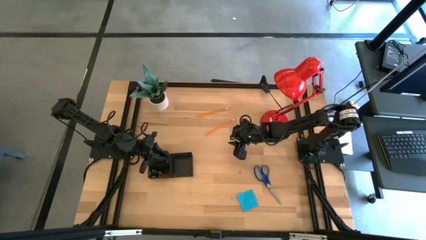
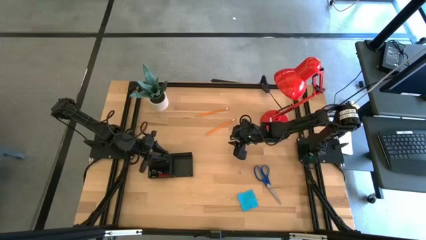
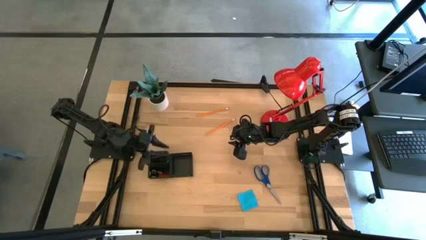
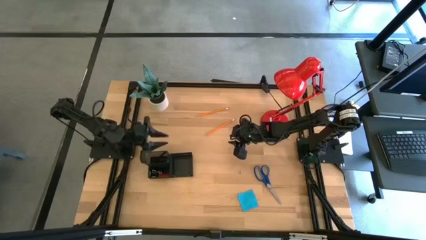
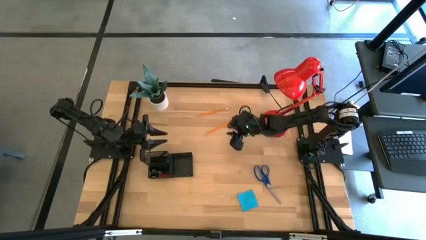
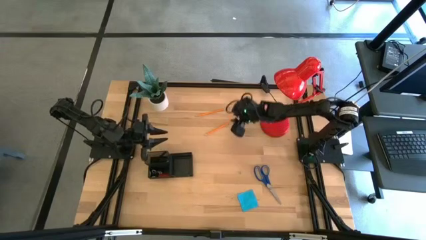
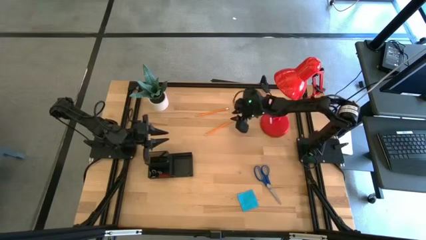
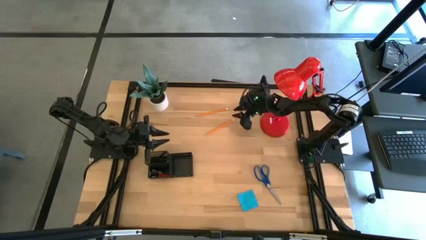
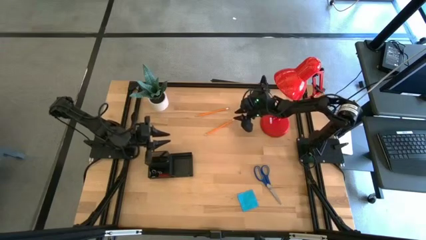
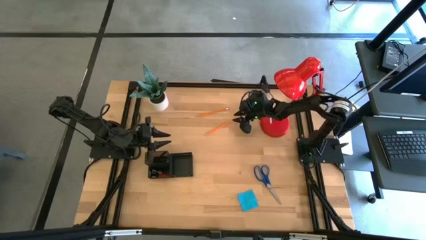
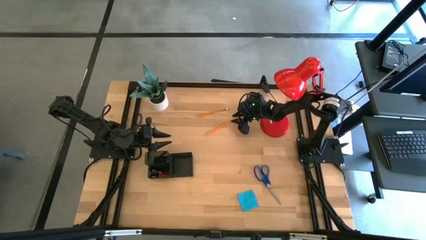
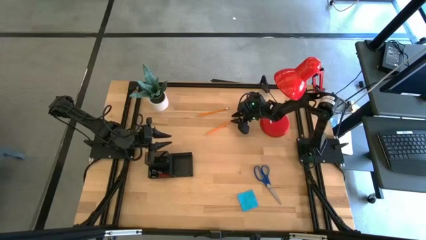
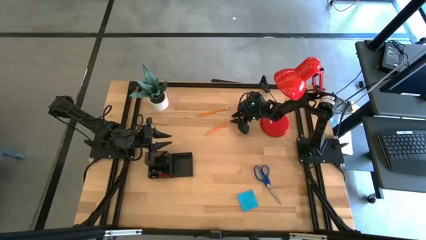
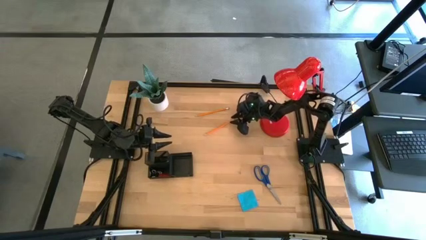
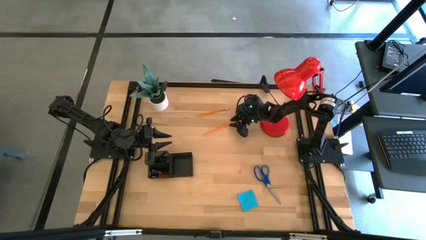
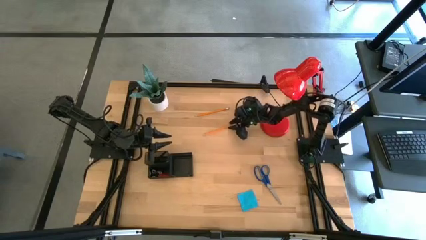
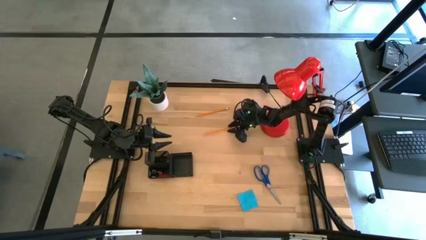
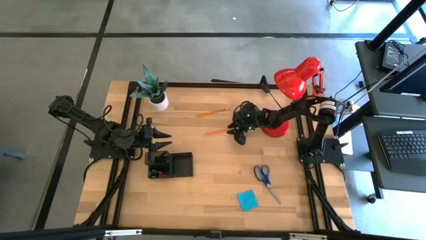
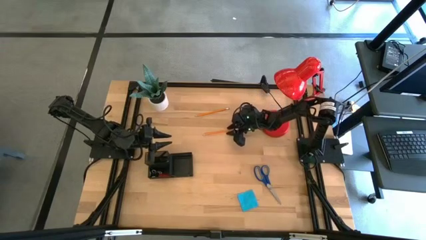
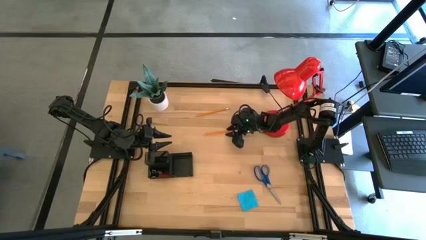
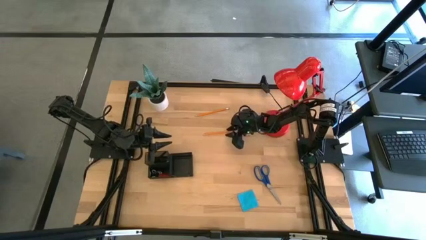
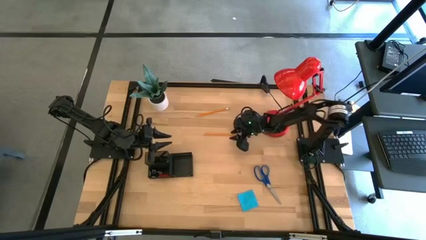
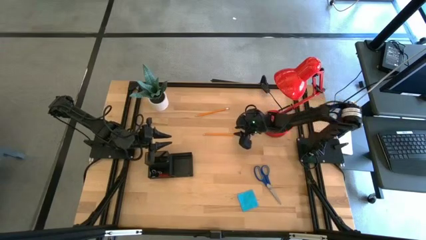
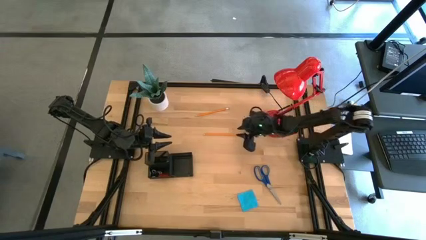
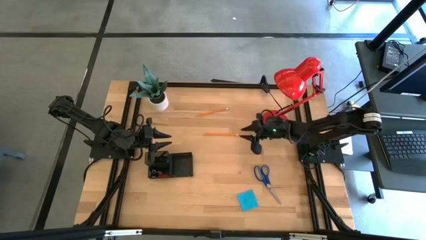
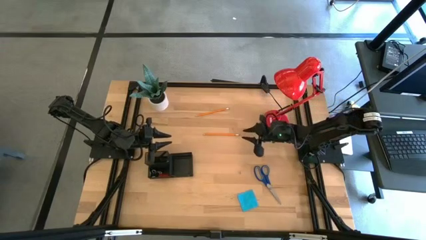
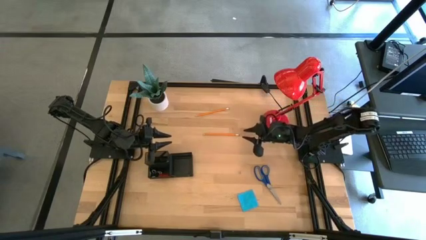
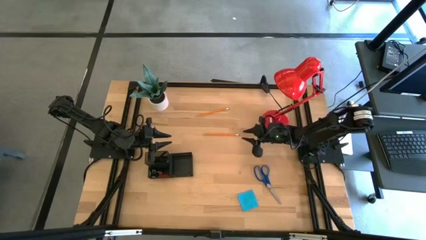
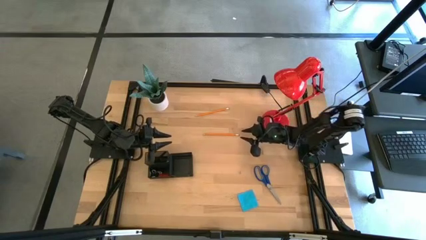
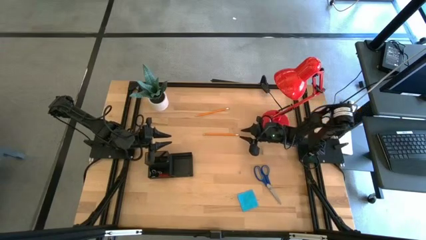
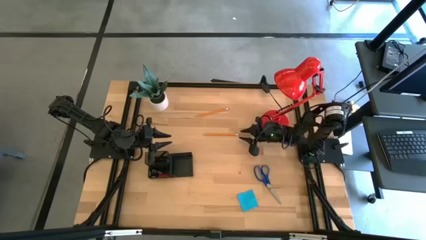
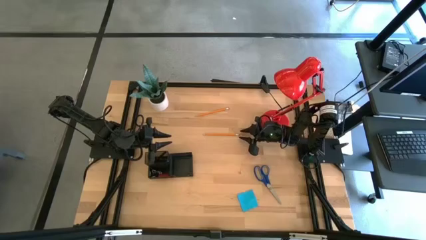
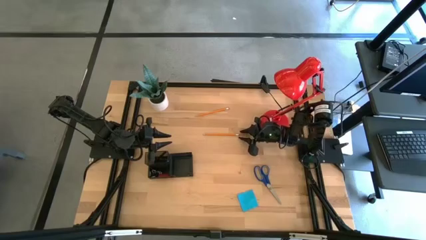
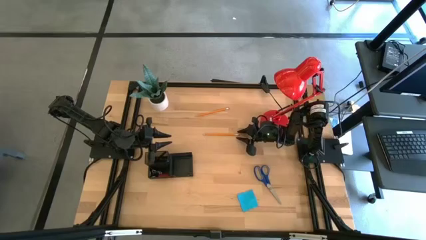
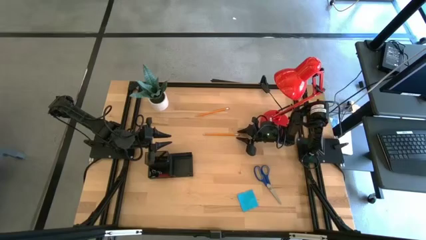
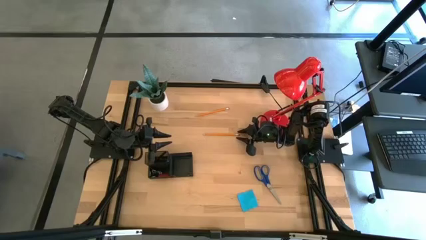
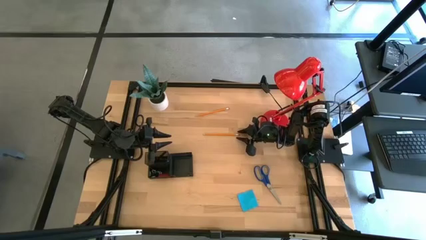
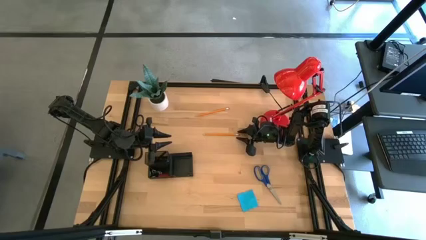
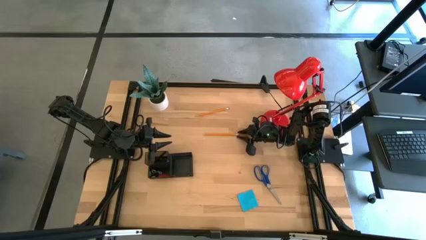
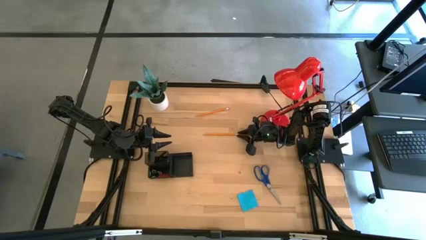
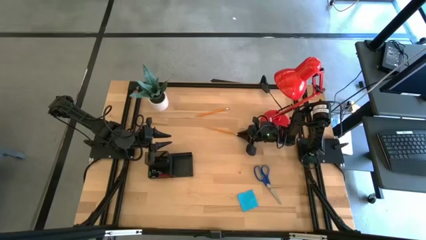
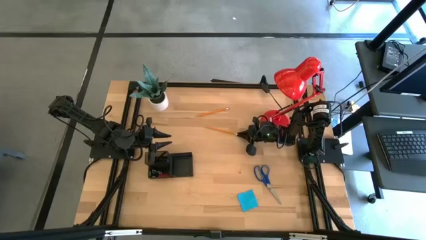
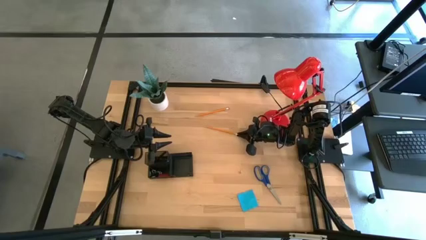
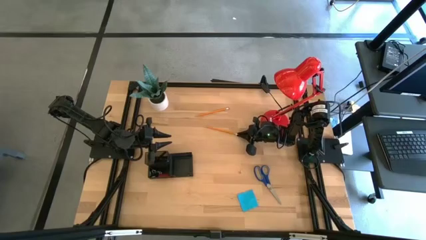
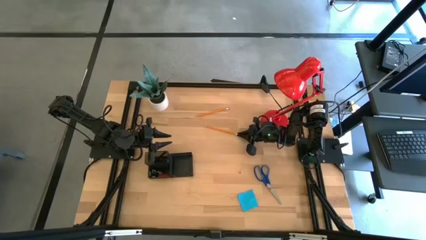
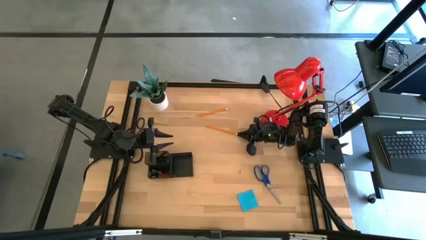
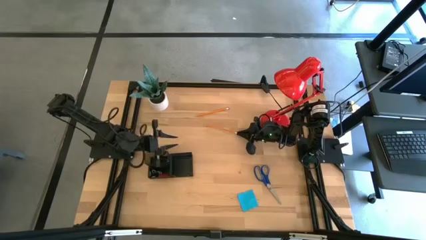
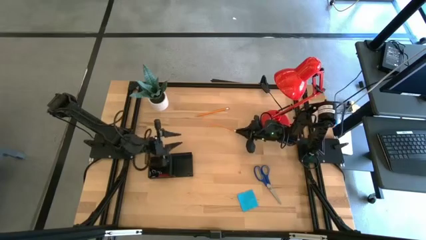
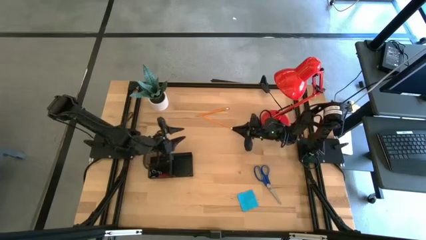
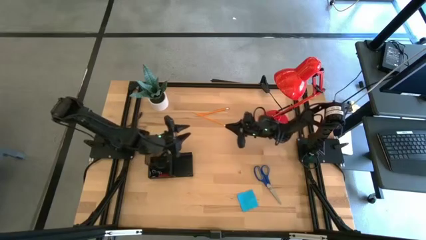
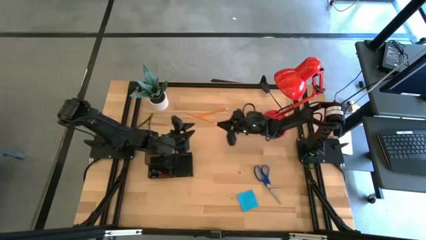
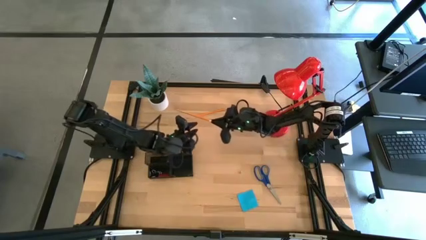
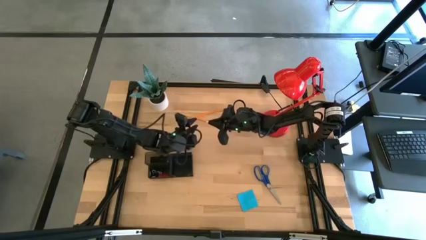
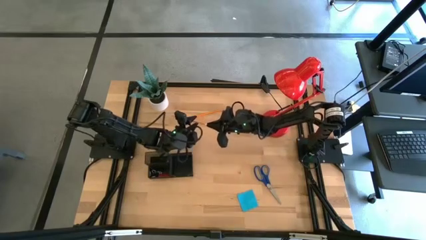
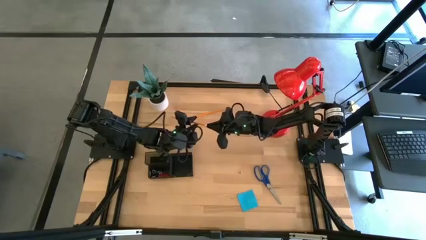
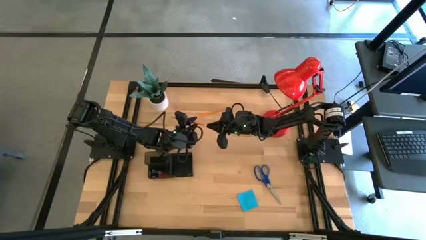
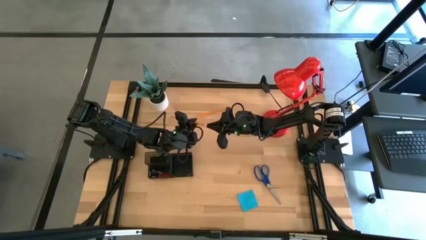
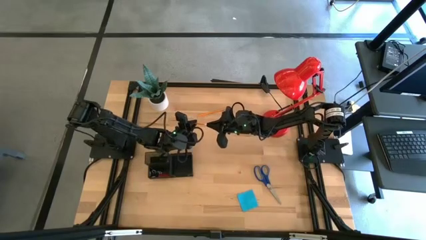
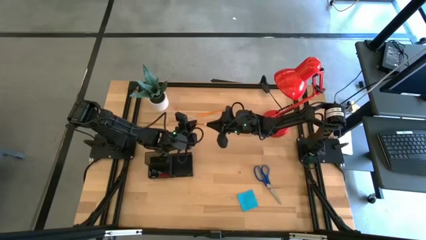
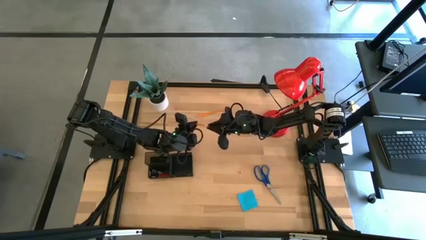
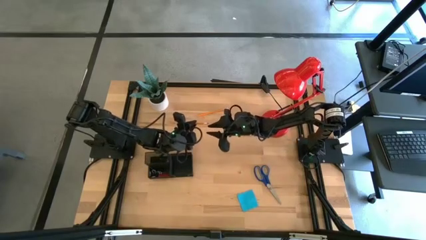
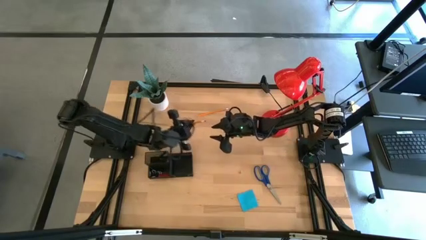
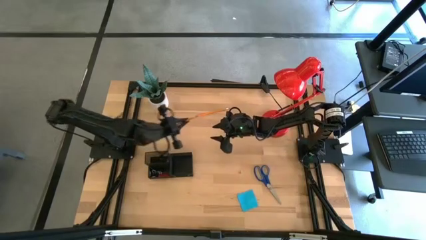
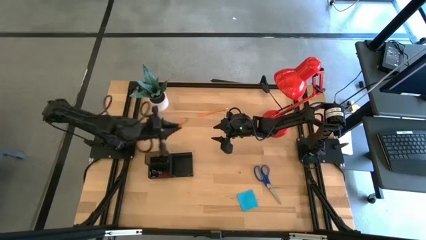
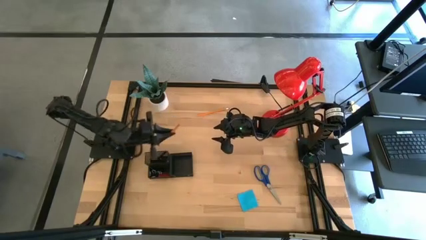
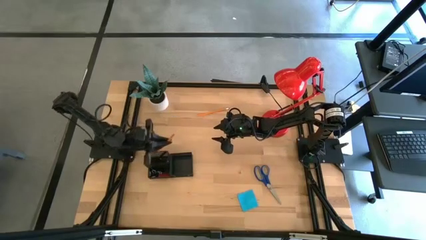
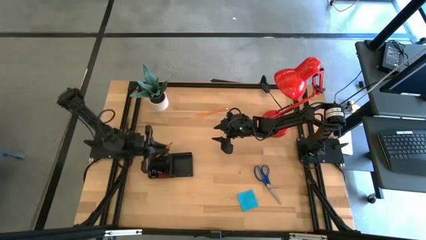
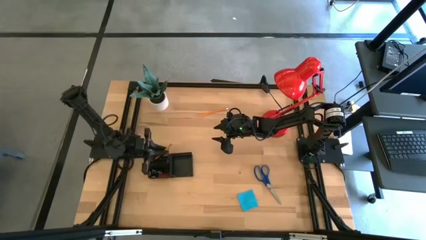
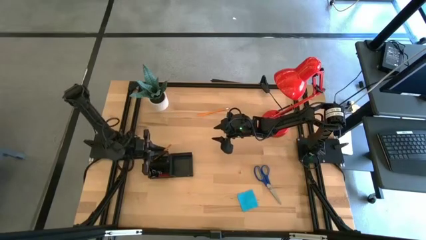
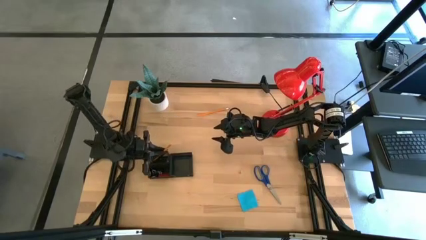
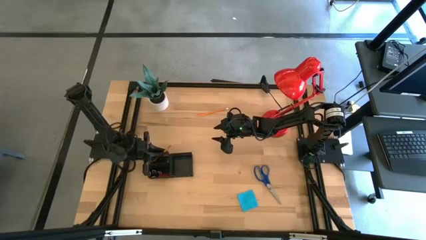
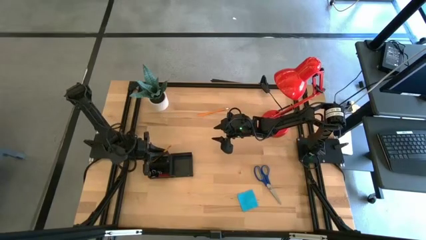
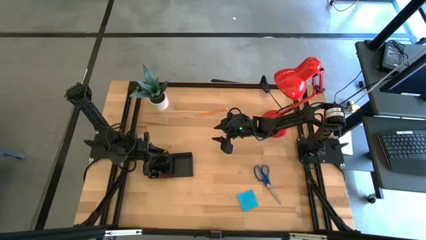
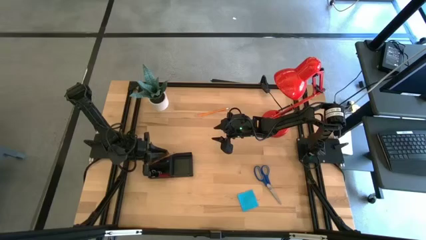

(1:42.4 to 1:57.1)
Task: Pick and place office supplies into organizer
Put the bottom yellow pencil into the back left compartment of the desk organizer
